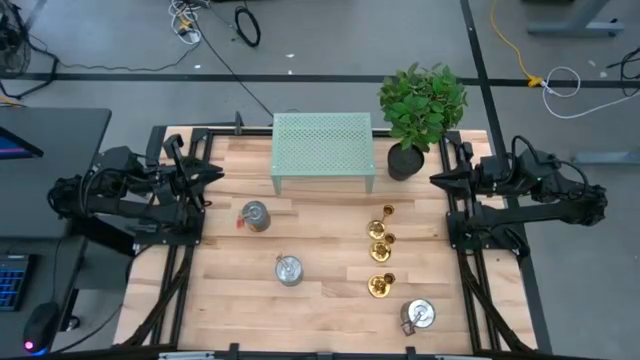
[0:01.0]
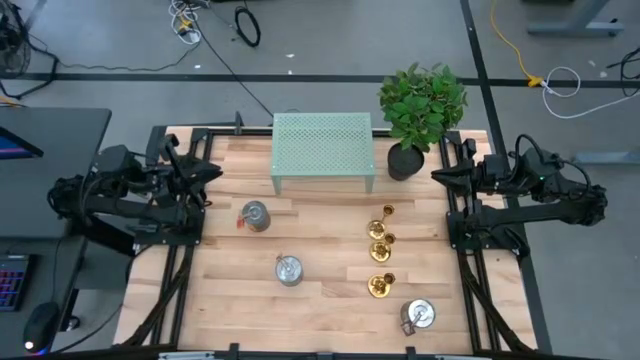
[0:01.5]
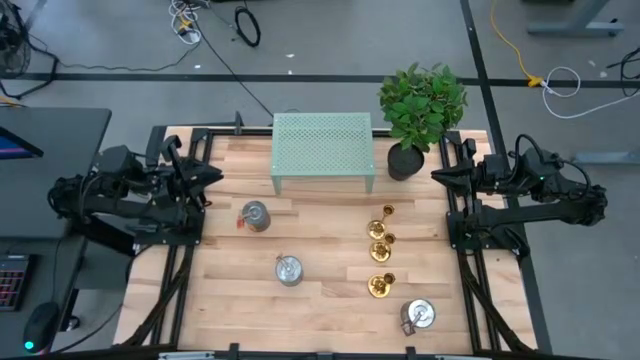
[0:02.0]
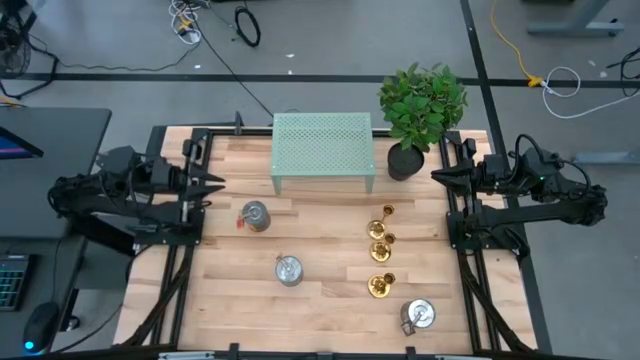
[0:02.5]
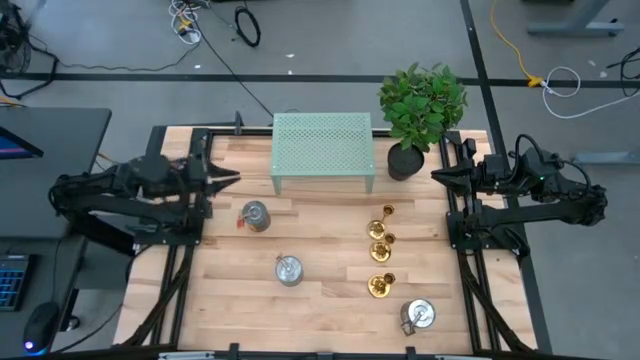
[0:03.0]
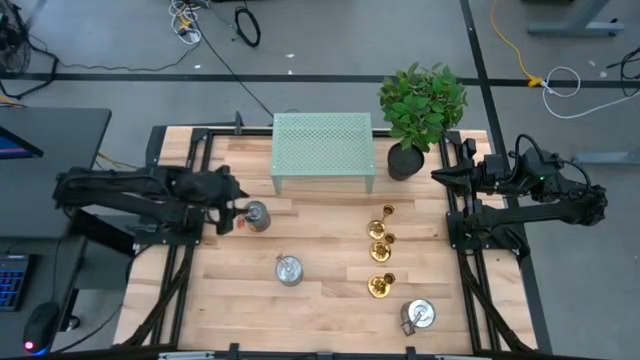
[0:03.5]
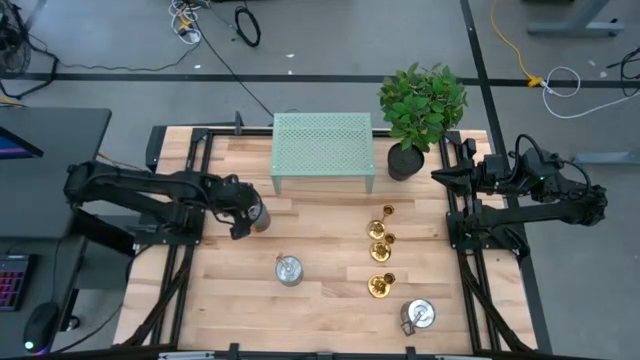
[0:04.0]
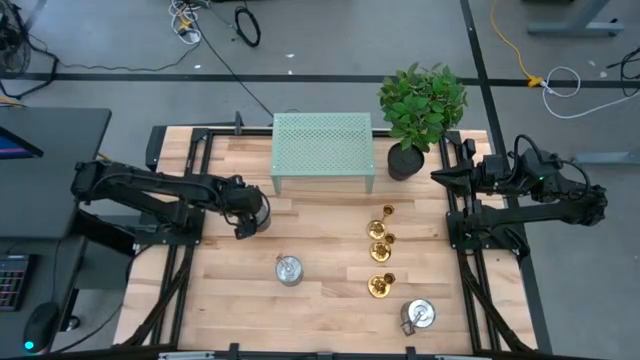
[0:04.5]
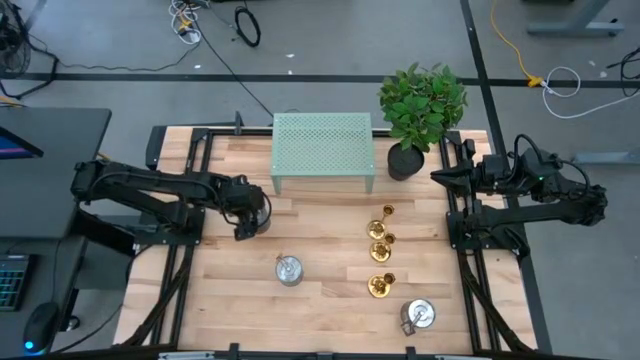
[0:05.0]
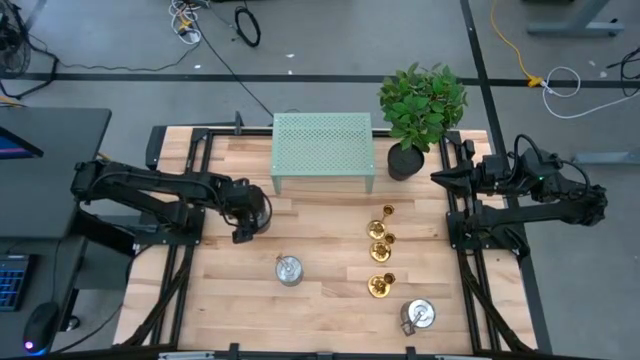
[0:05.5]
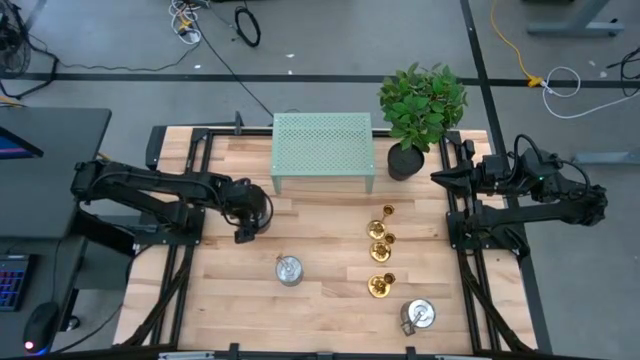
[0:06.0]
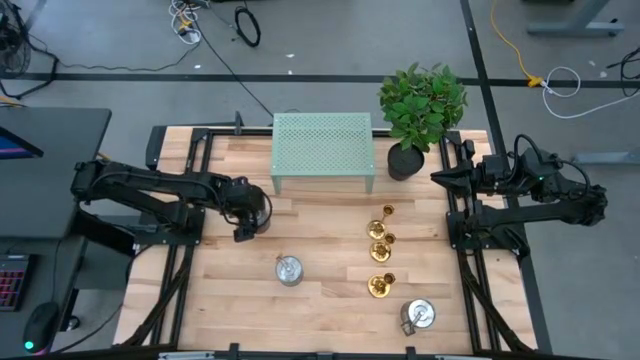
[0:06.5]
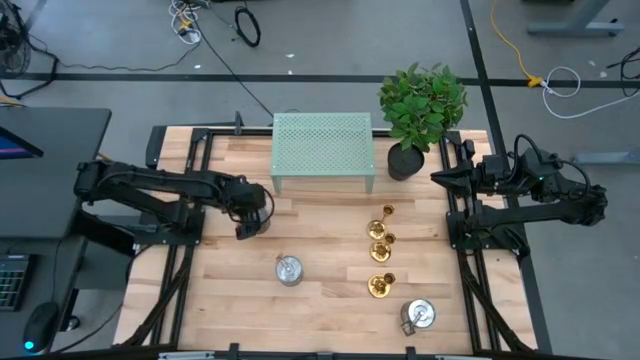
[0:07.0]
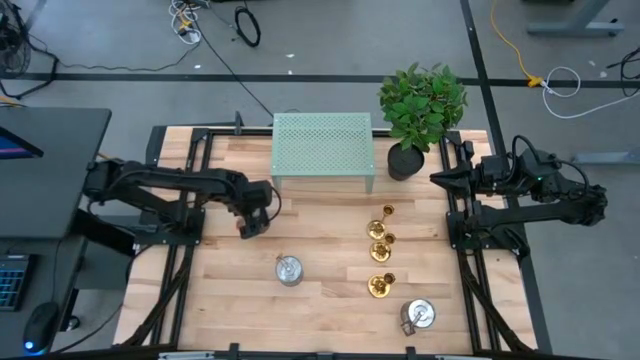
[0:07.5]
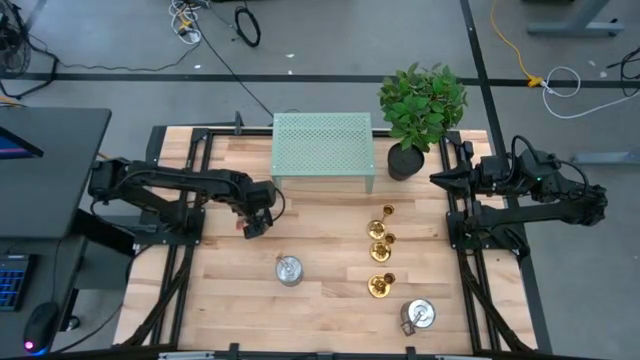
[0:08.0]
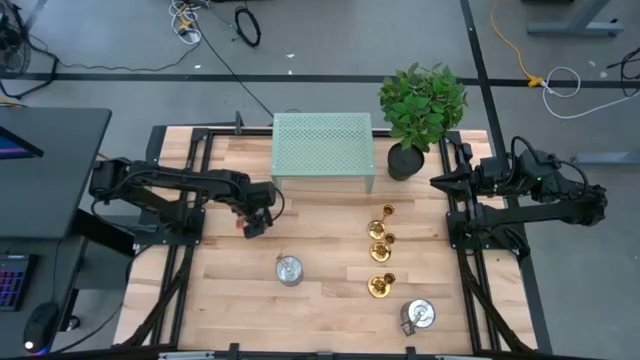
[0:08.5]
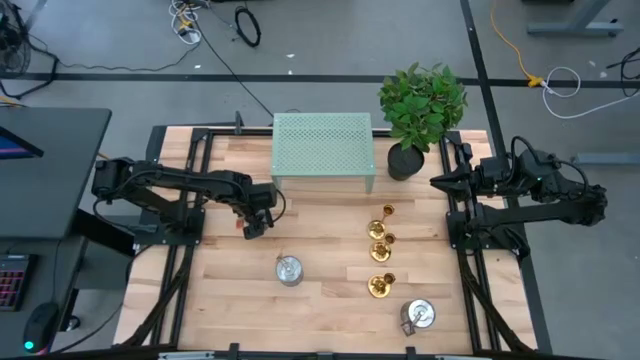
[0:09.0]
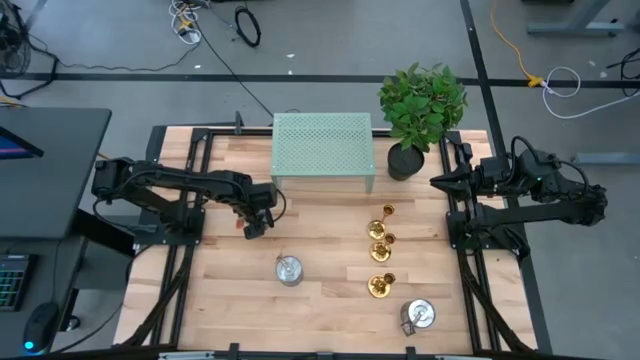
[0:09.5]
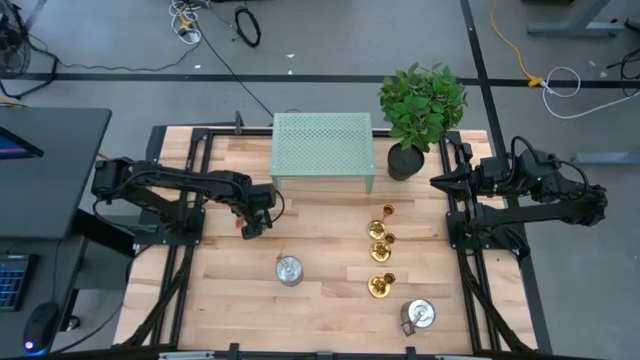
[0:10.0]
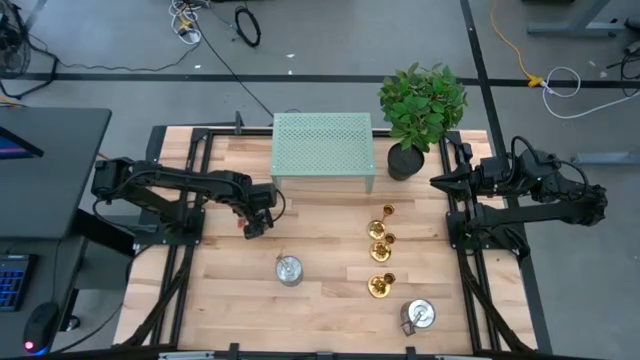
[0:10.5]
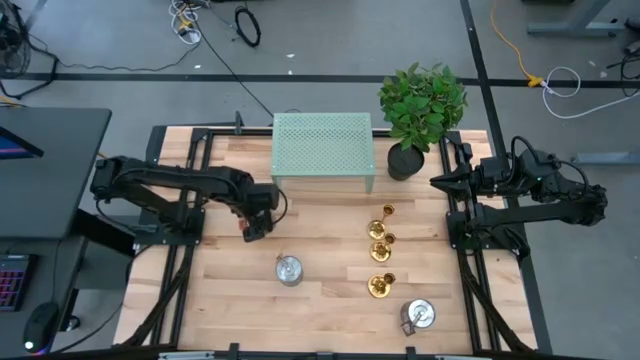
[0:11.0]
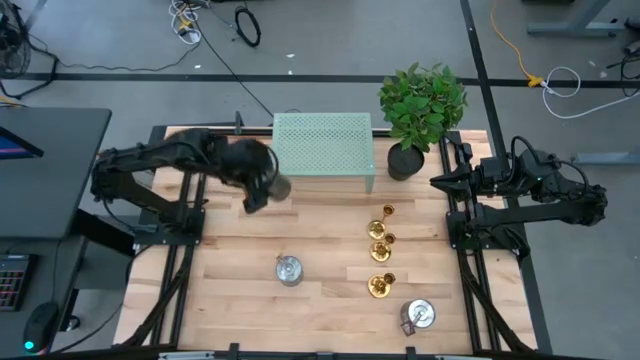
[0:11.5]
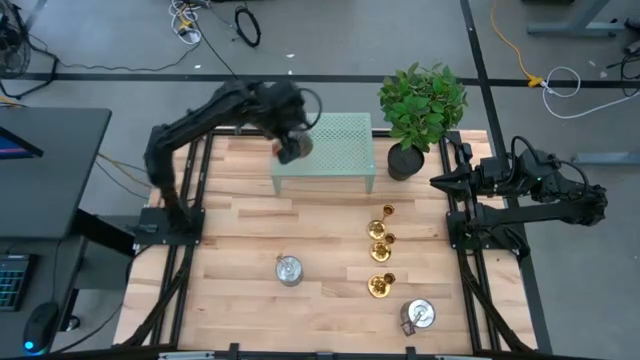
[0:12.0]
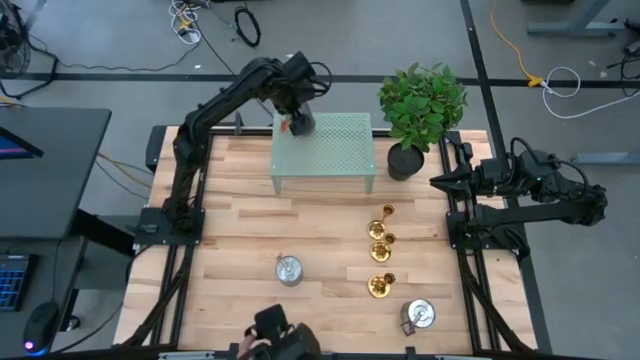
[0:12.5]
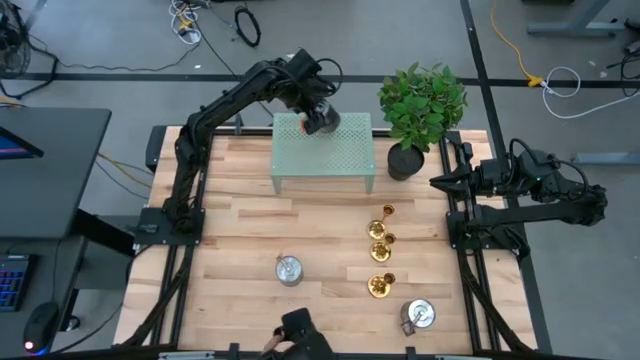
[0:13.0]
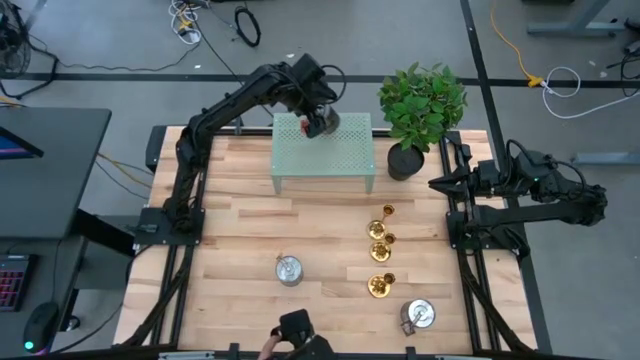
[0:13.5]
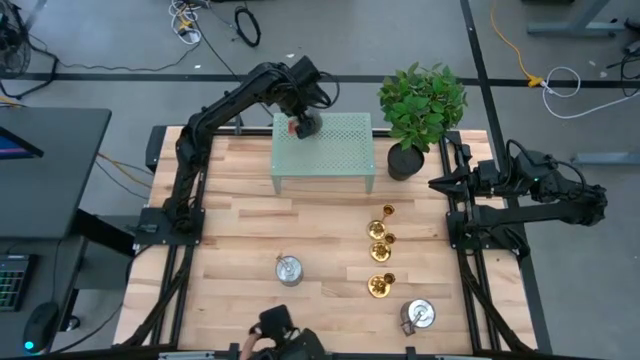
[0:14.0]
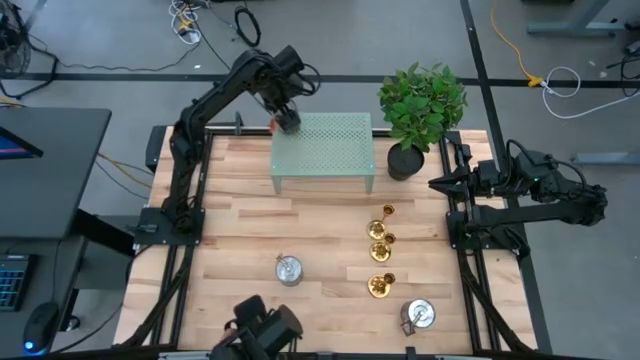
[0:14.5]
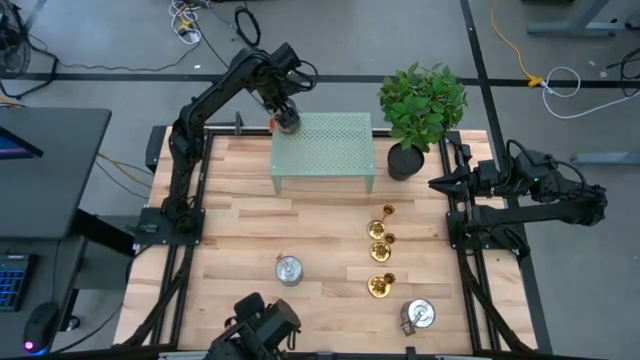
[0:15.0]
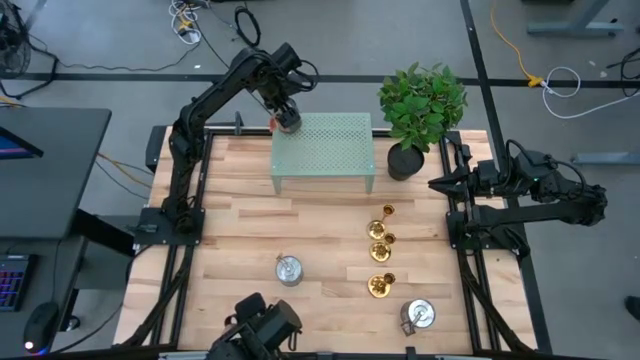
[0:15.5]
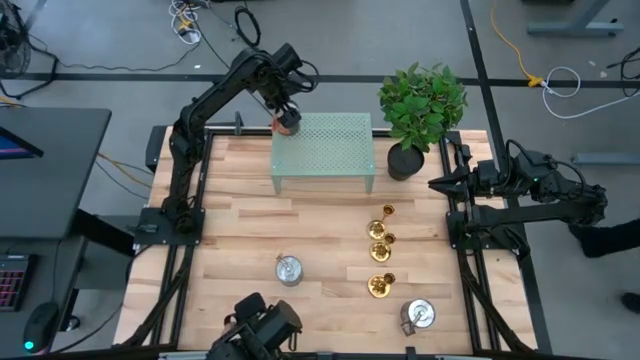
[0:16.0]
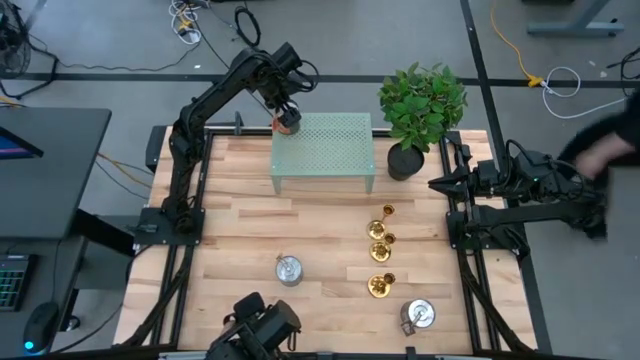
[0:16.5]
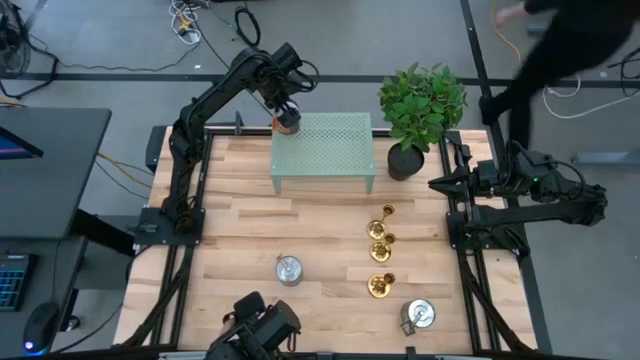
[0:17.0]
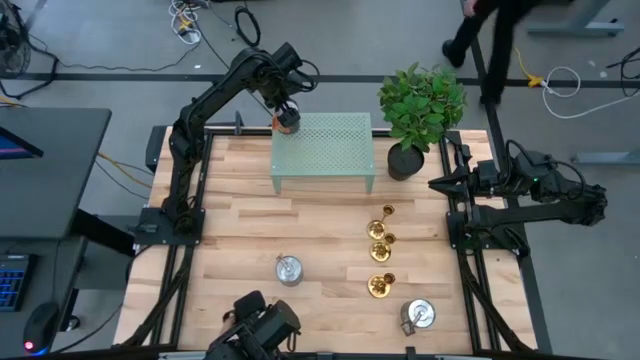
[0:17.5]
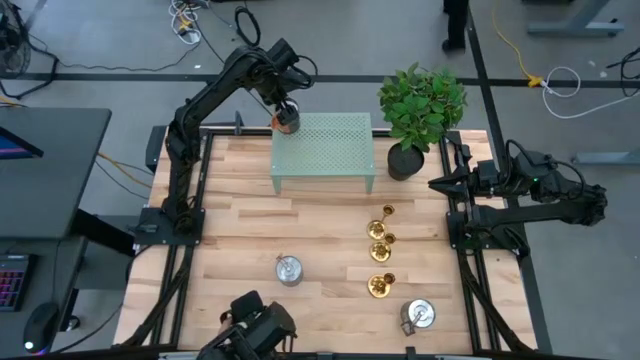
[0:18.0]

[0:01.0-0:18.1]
Task: Pick & Place candle stick holders
Put the top silver scented candle on the shelf
